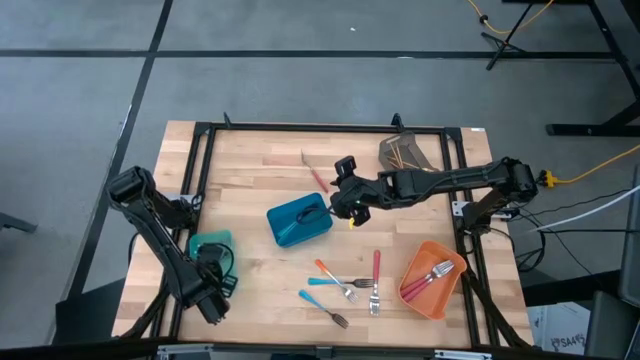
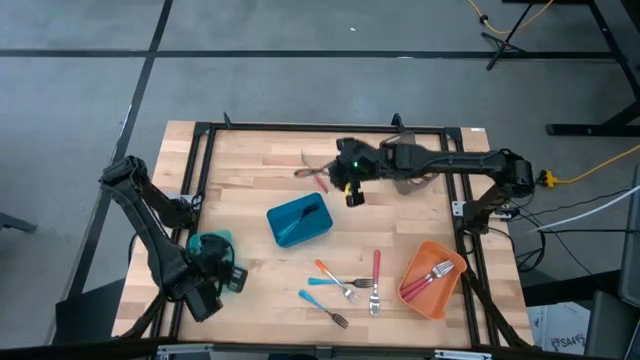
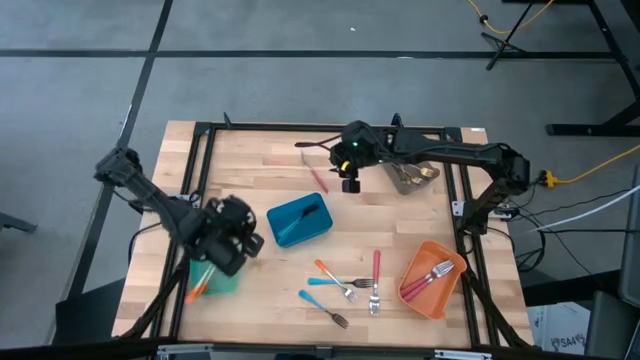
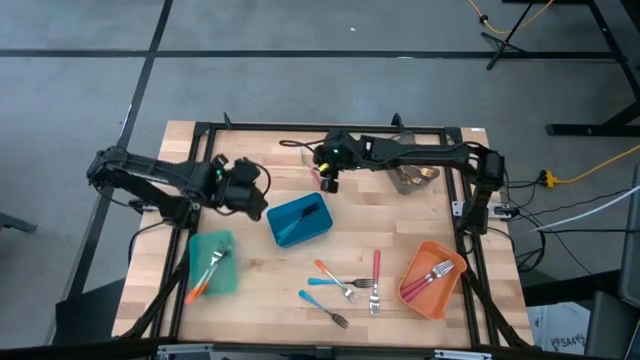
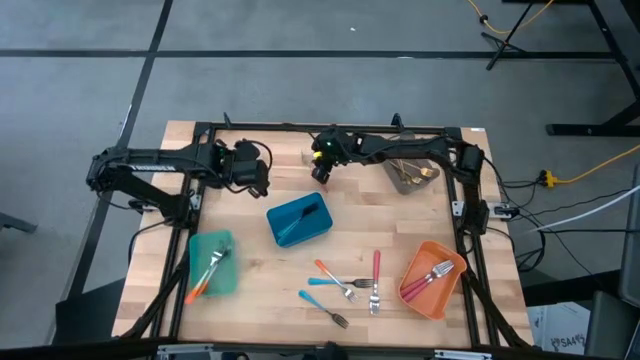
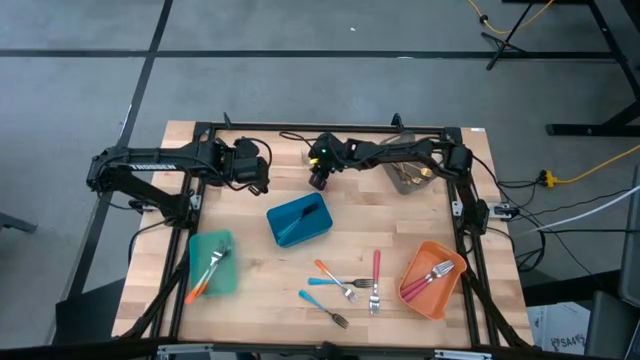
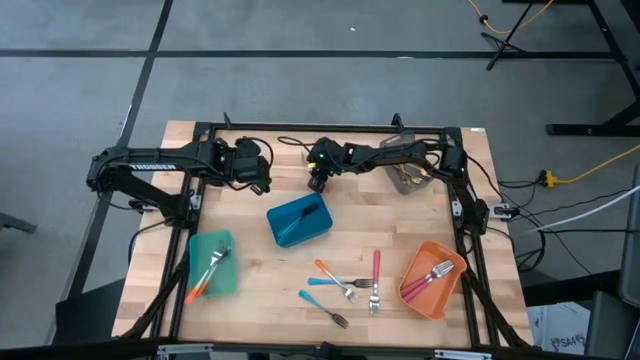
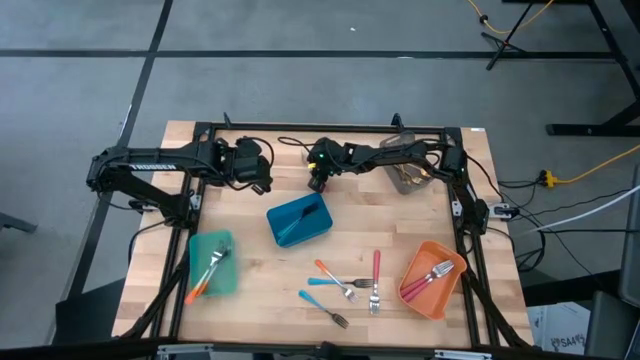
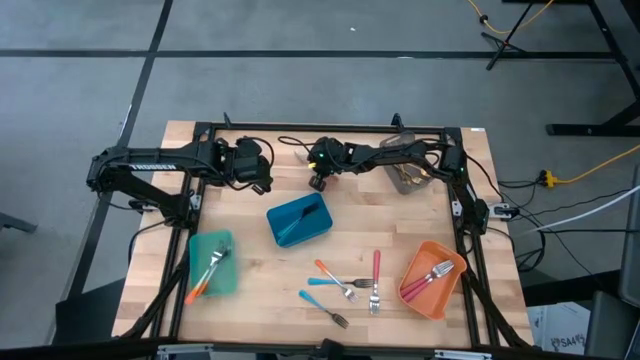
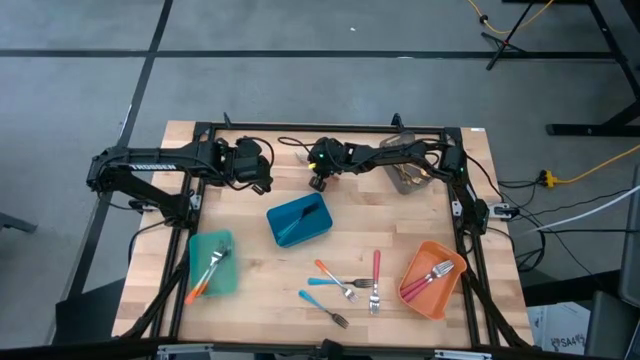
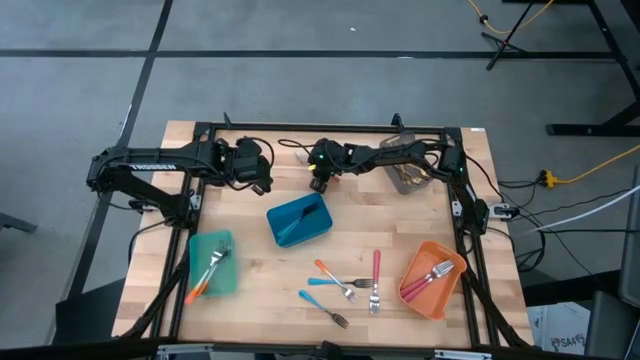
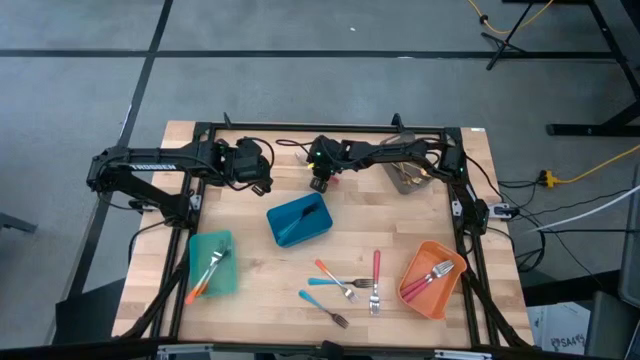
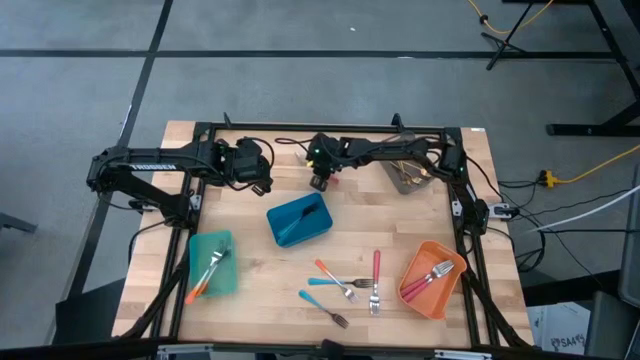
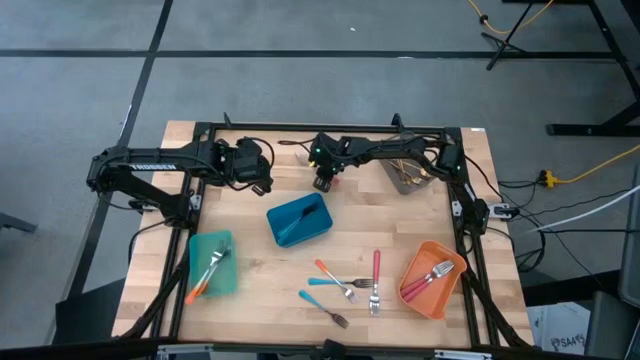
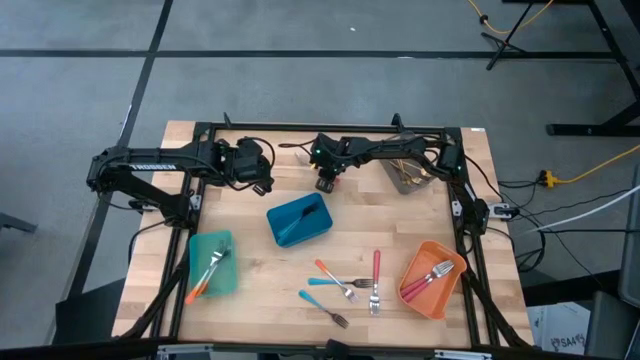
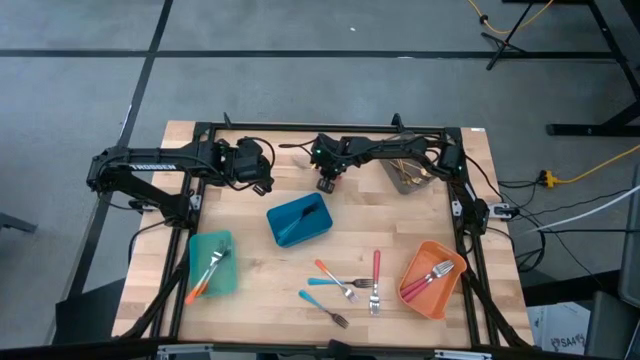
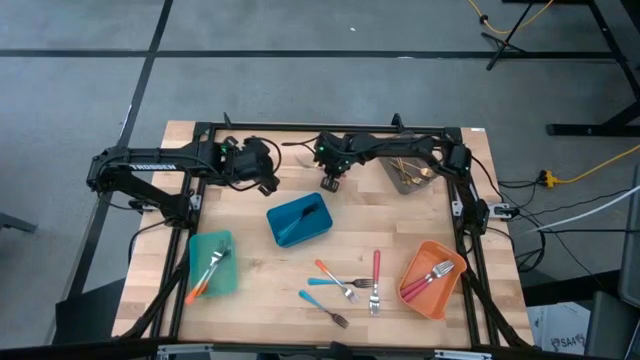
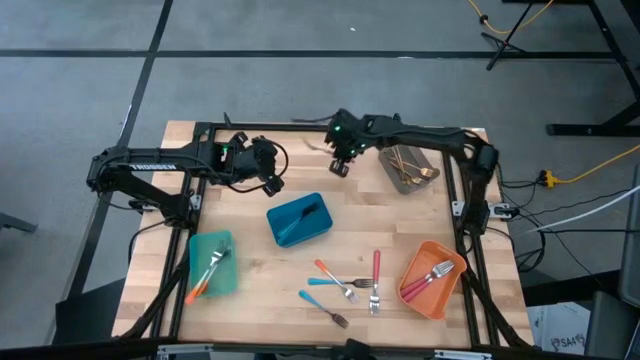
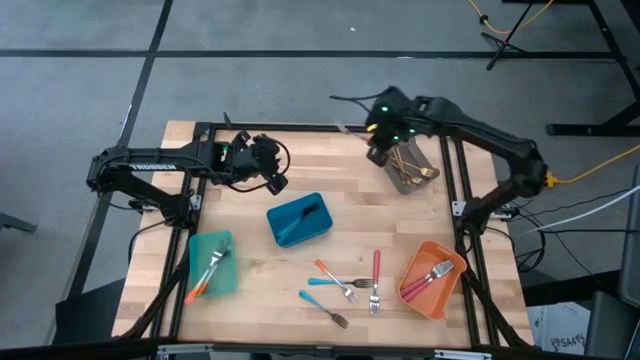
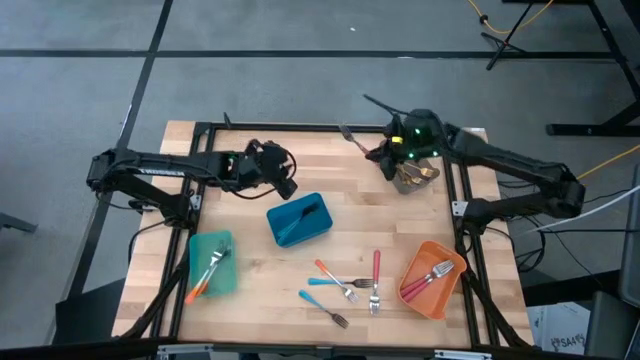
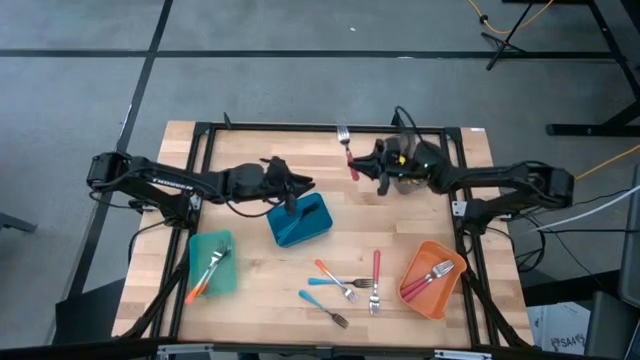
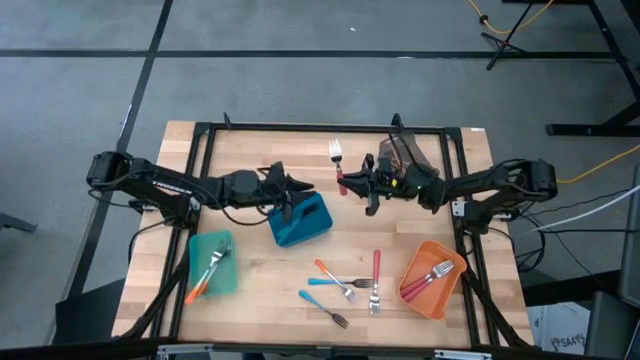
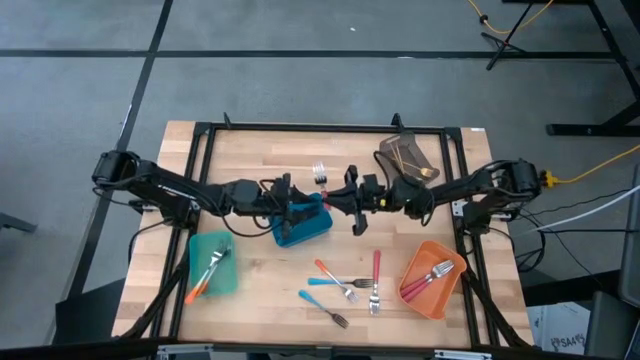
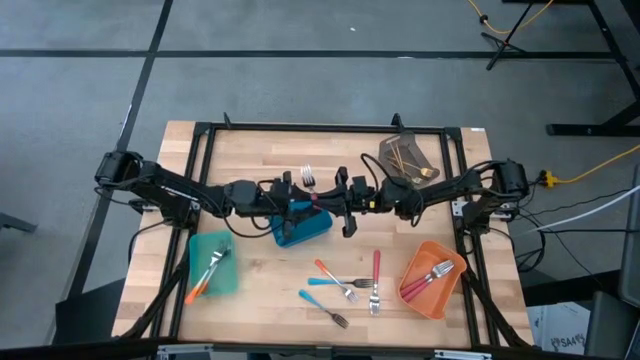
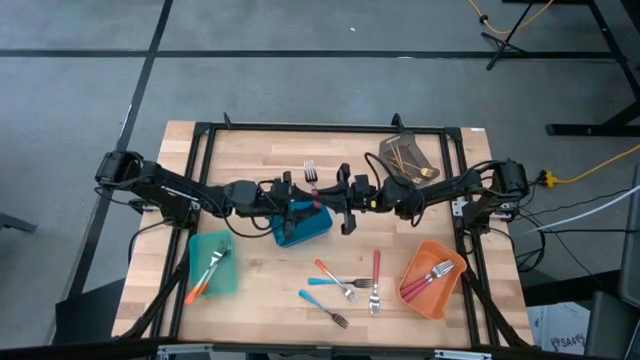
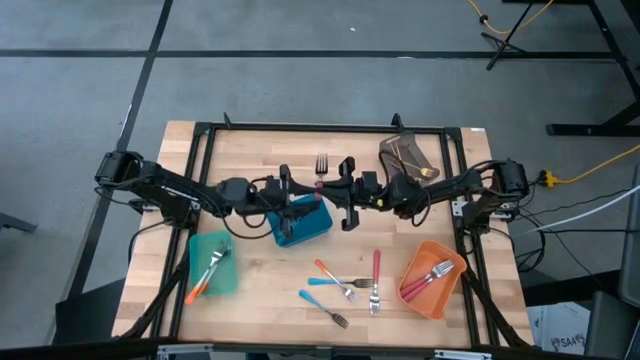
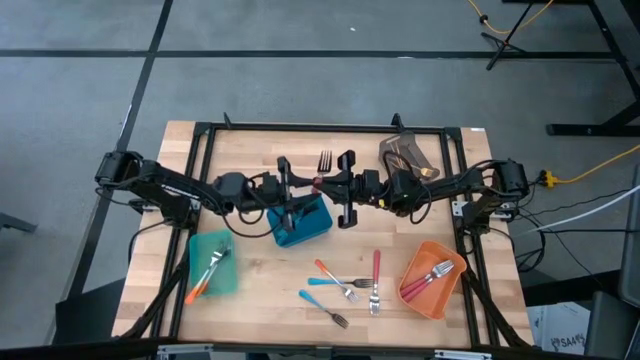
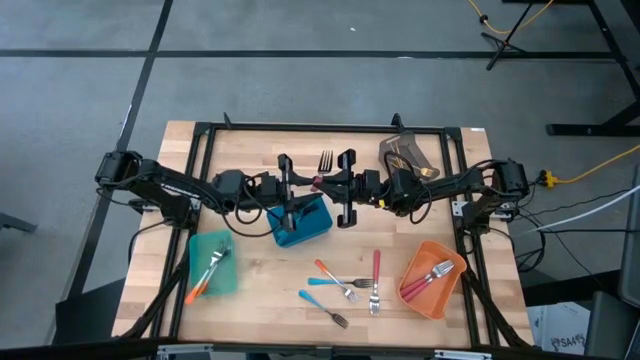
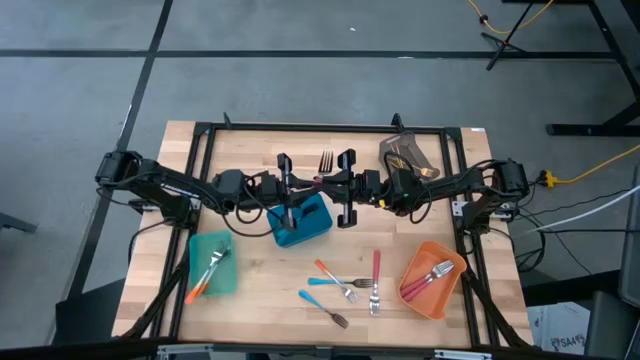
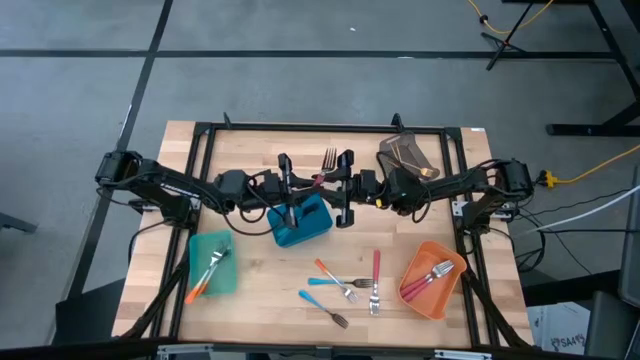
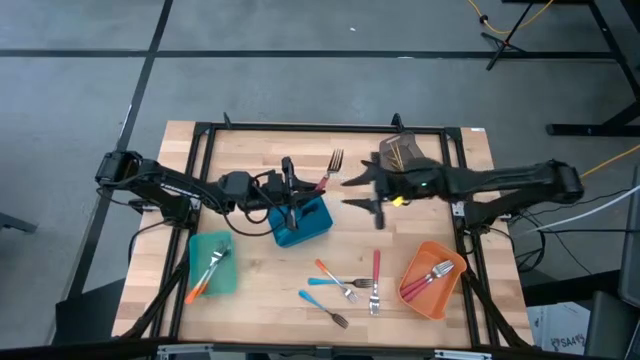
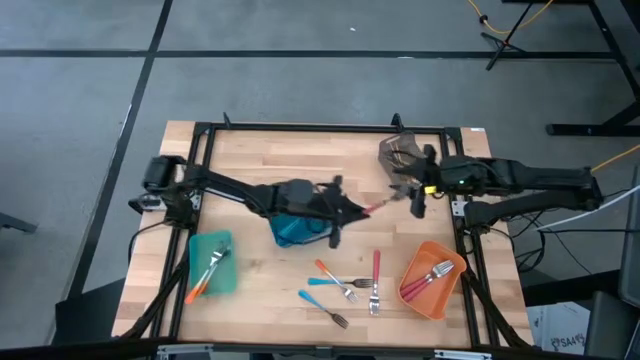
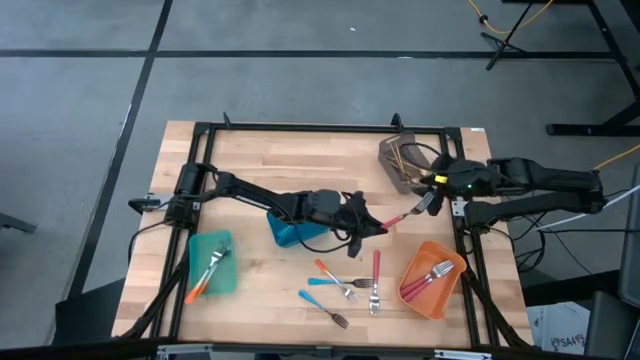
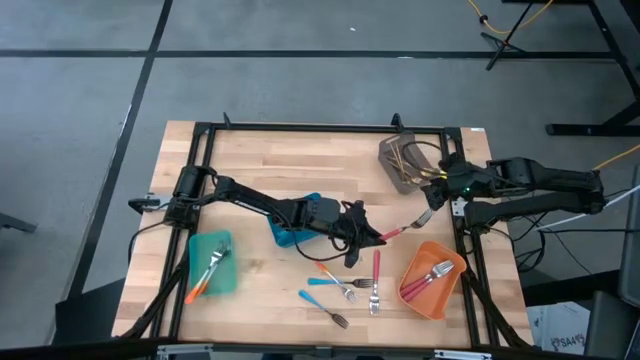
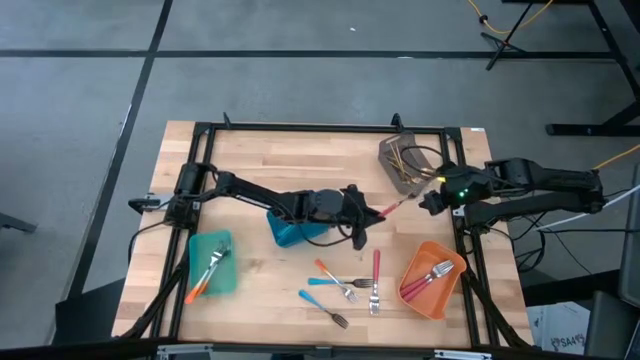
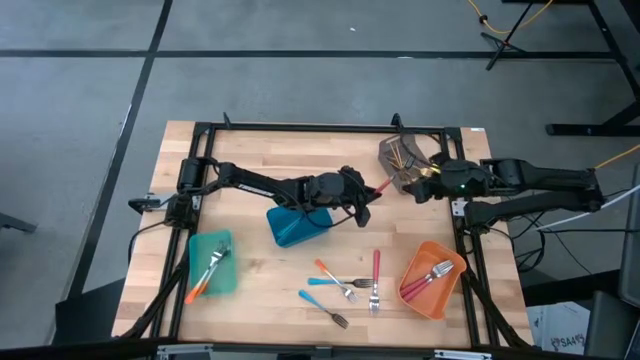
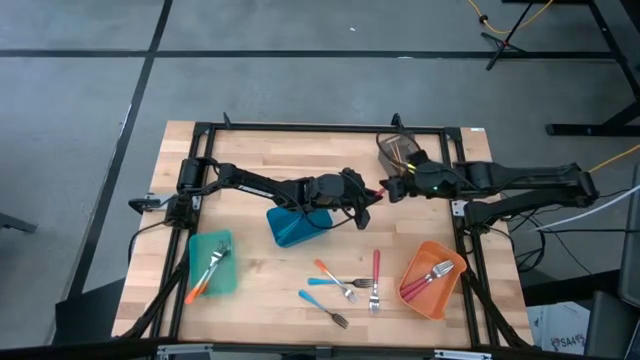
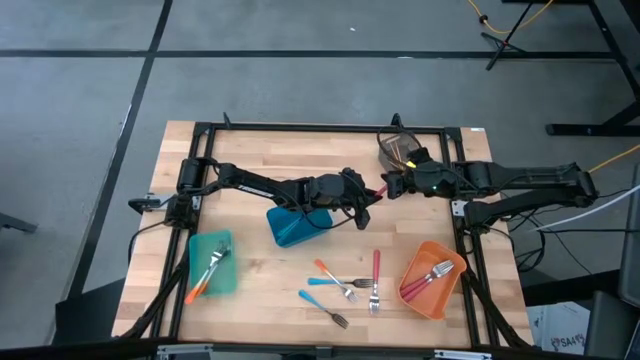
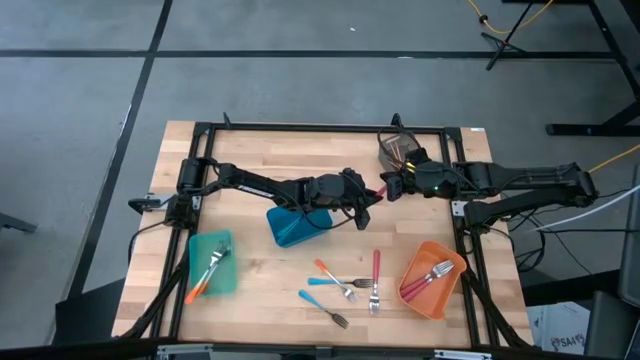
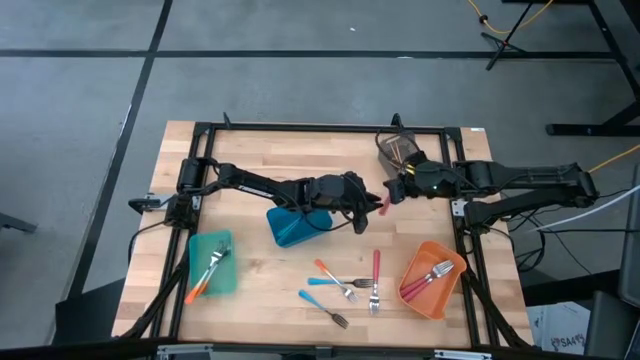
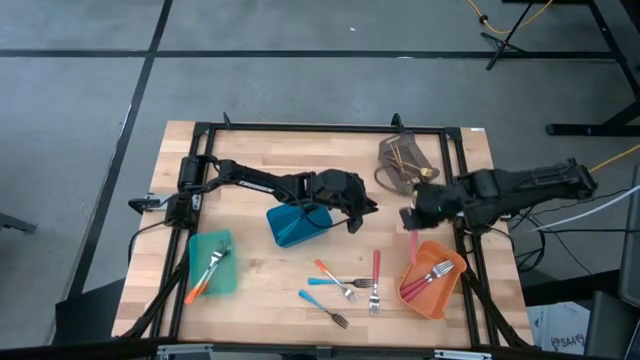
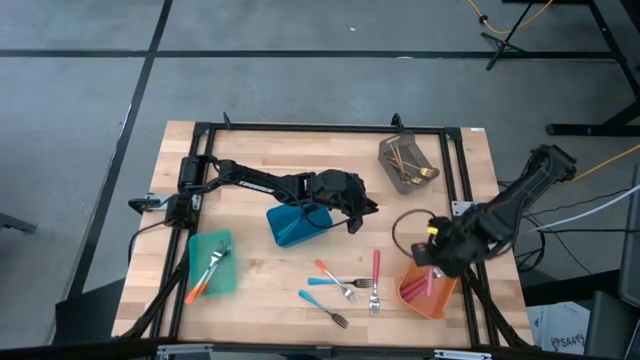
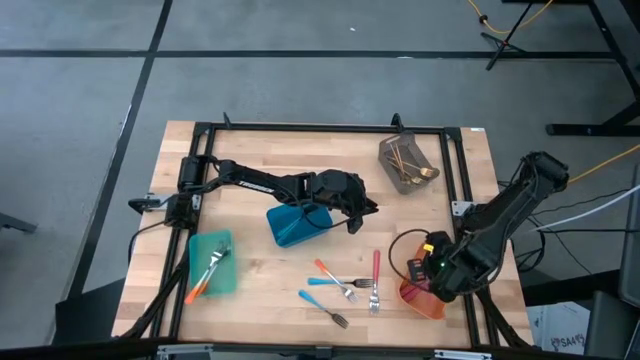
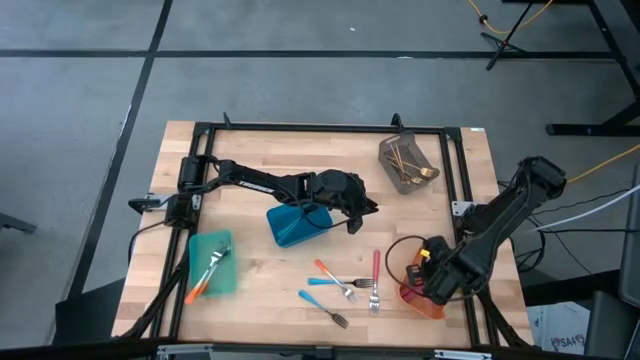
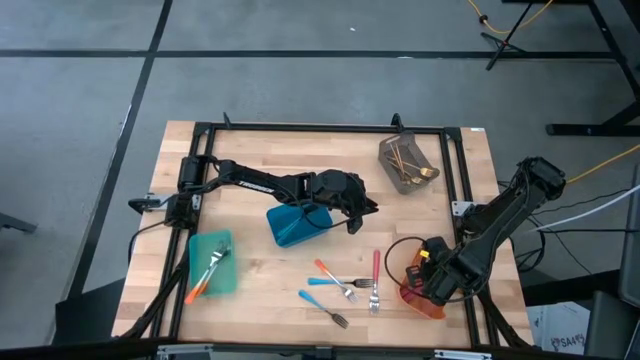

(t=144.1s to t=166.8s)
Task: Sort silverware by color (type)
Put the top pink fork into the orange bin
